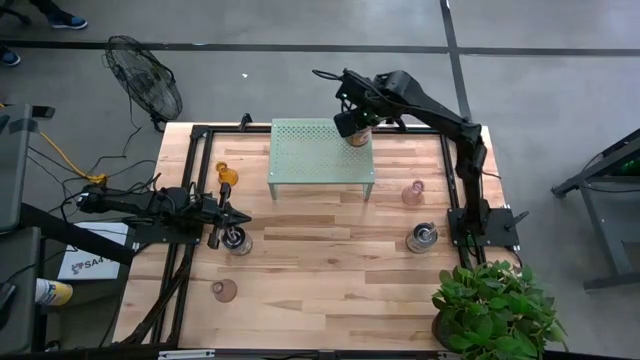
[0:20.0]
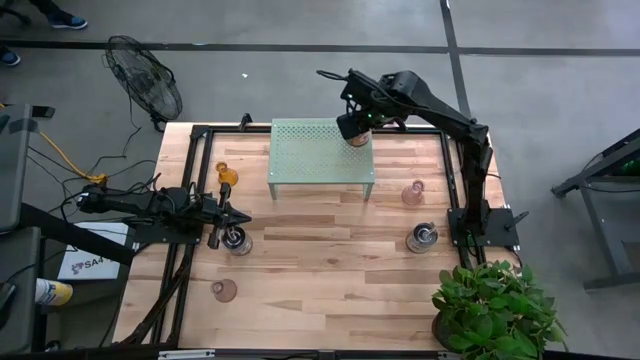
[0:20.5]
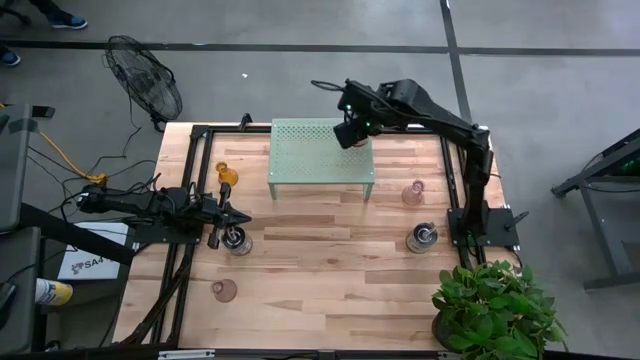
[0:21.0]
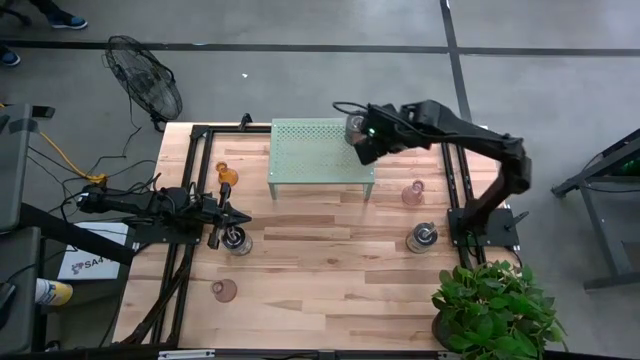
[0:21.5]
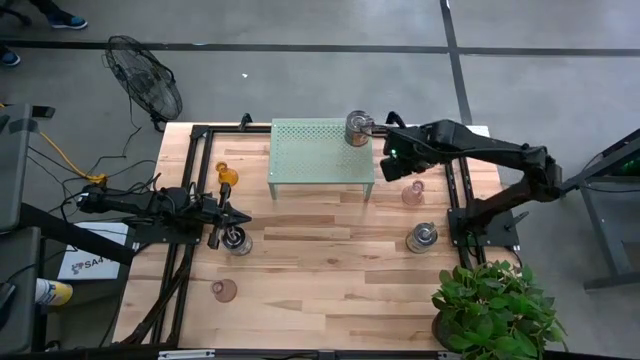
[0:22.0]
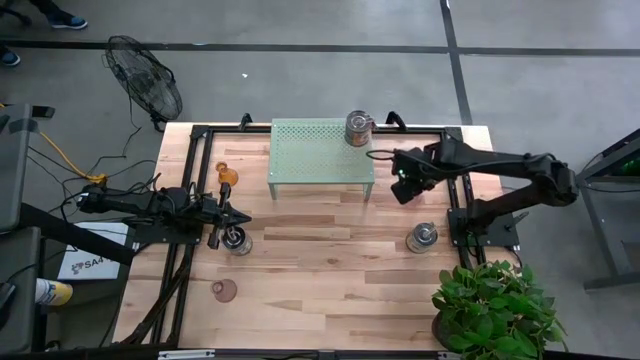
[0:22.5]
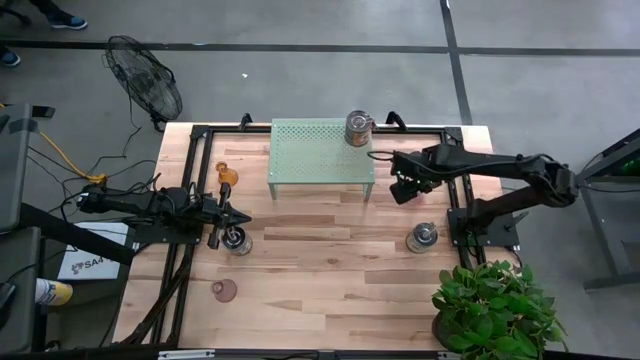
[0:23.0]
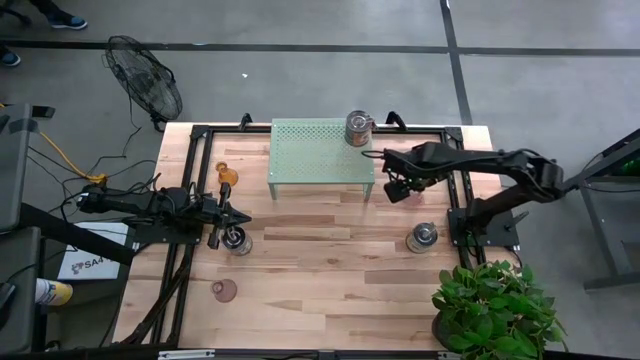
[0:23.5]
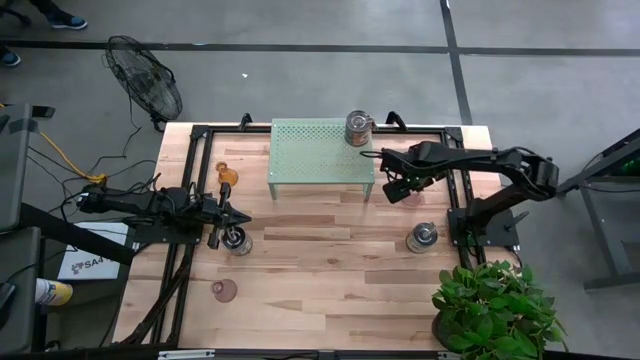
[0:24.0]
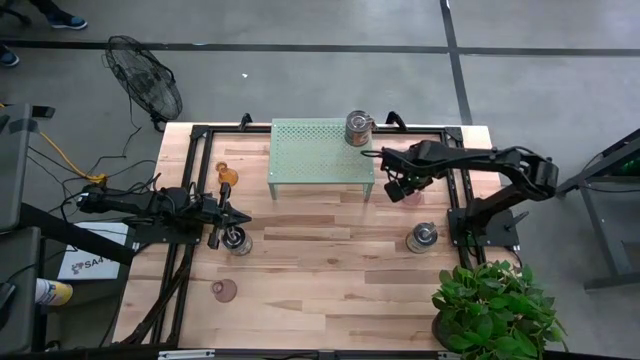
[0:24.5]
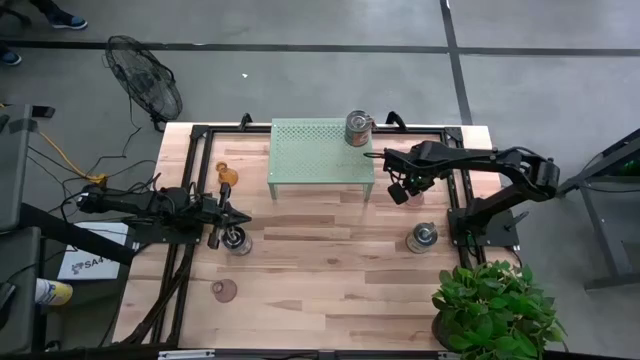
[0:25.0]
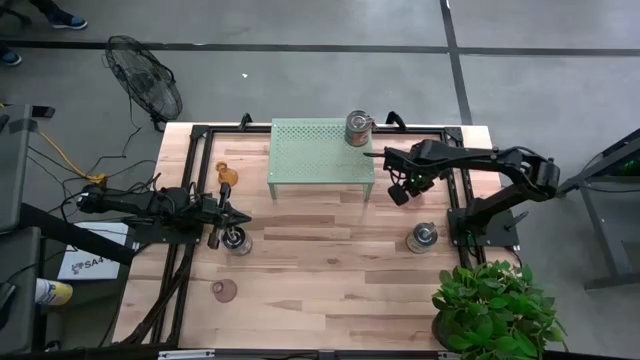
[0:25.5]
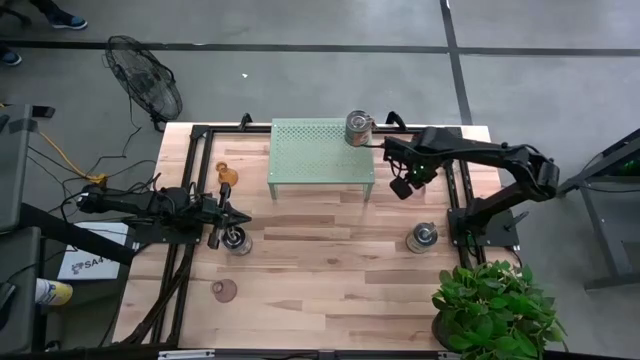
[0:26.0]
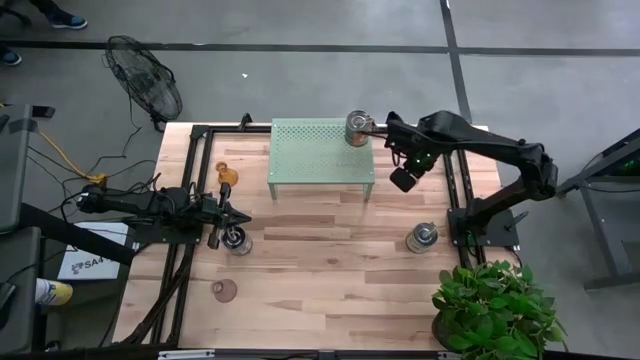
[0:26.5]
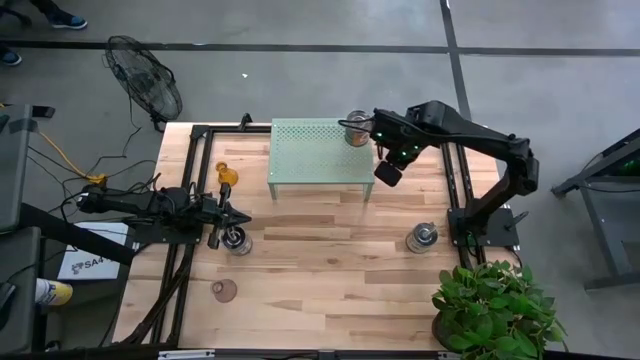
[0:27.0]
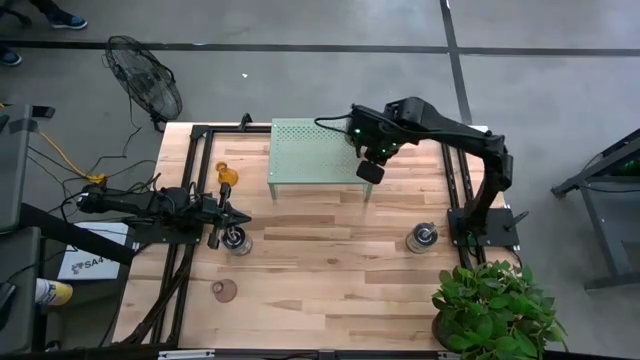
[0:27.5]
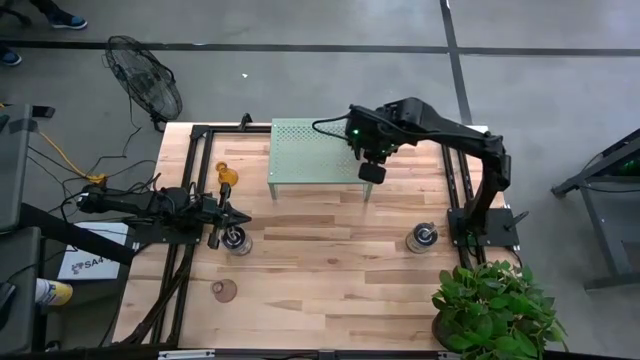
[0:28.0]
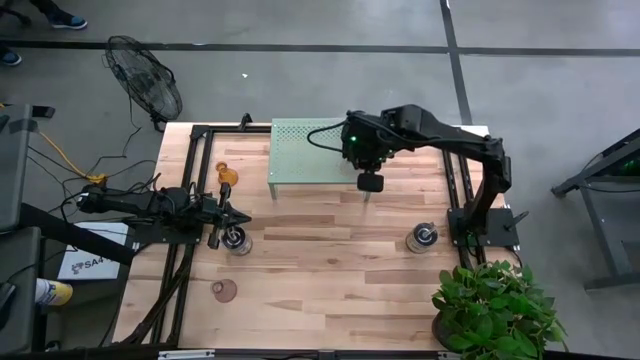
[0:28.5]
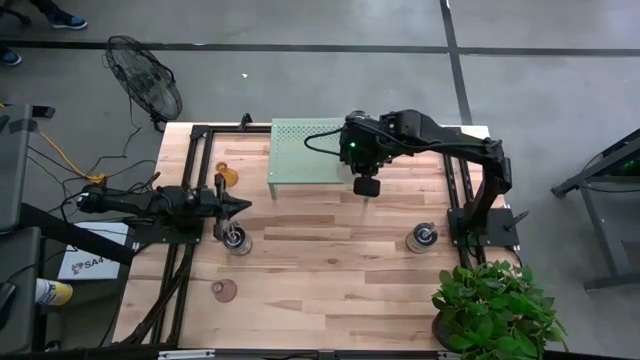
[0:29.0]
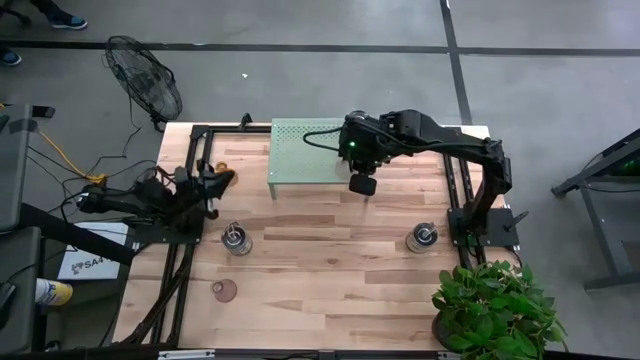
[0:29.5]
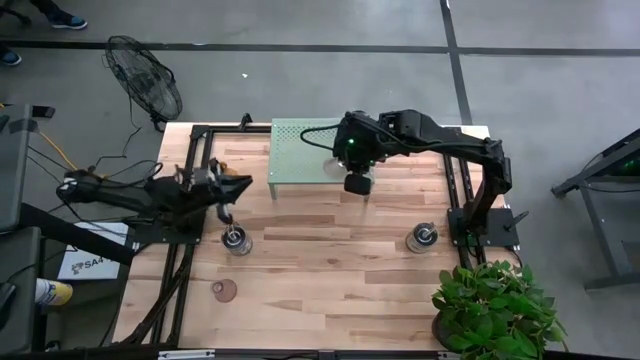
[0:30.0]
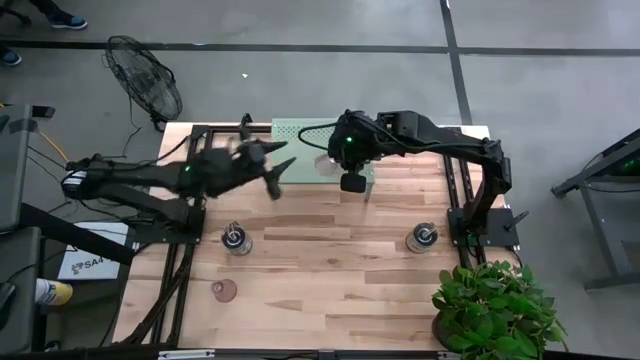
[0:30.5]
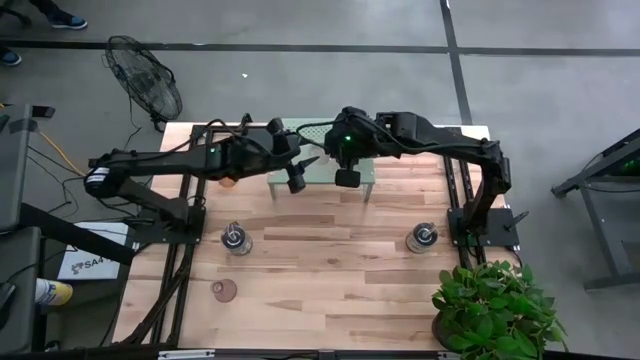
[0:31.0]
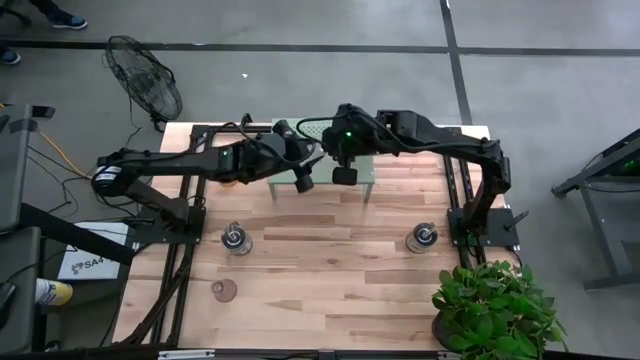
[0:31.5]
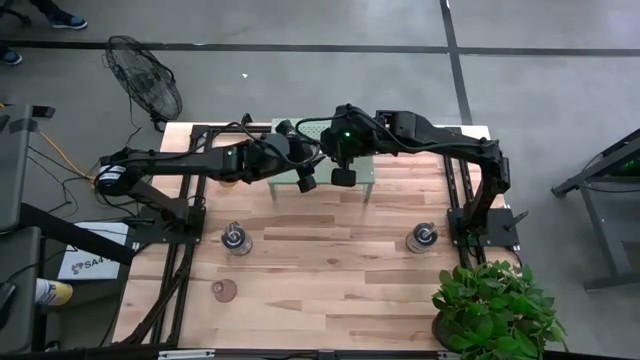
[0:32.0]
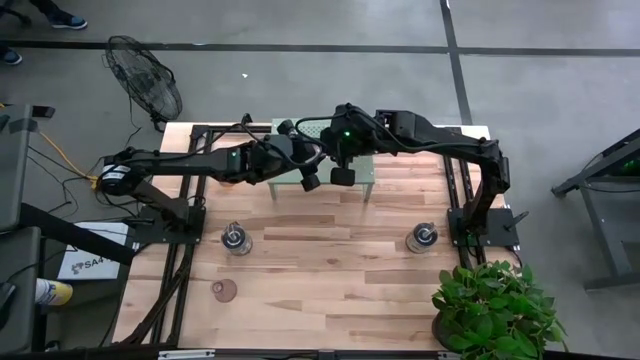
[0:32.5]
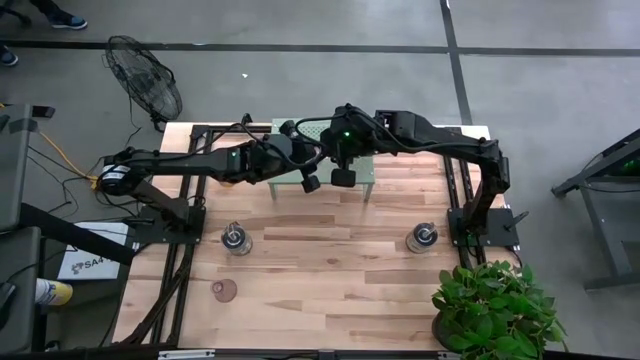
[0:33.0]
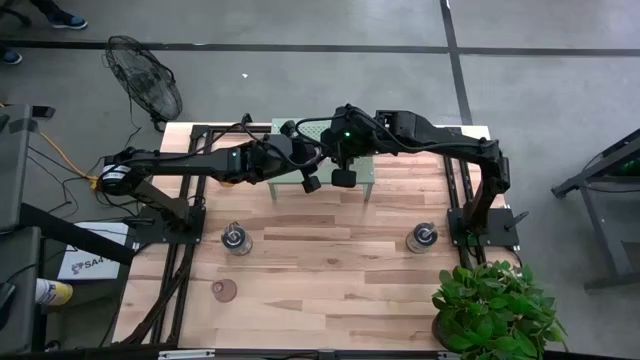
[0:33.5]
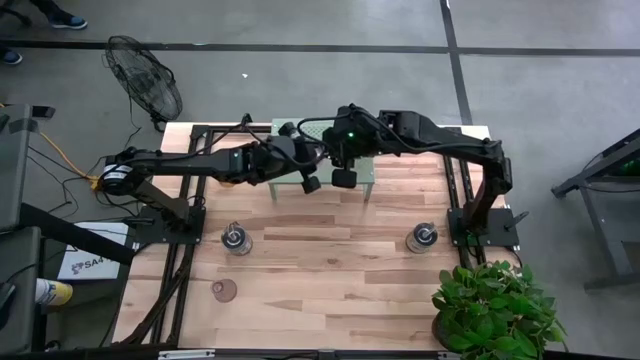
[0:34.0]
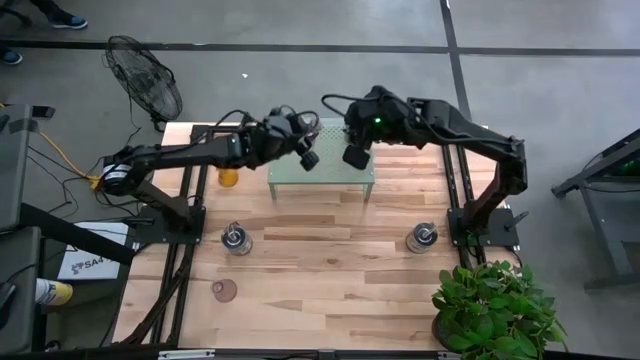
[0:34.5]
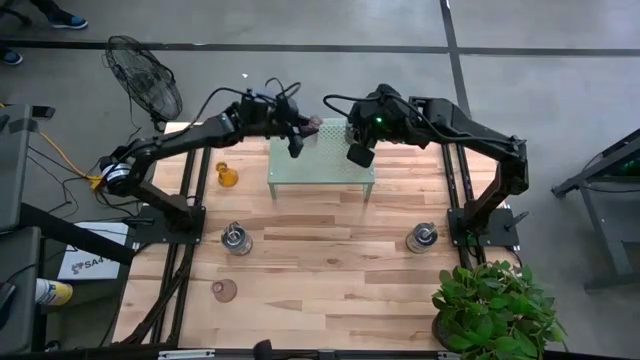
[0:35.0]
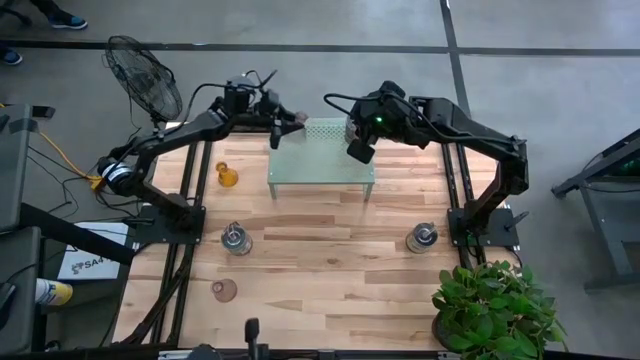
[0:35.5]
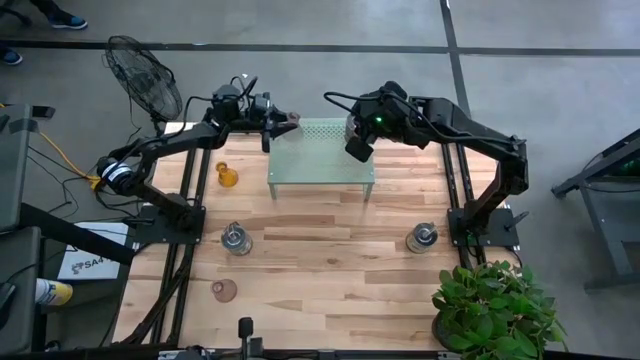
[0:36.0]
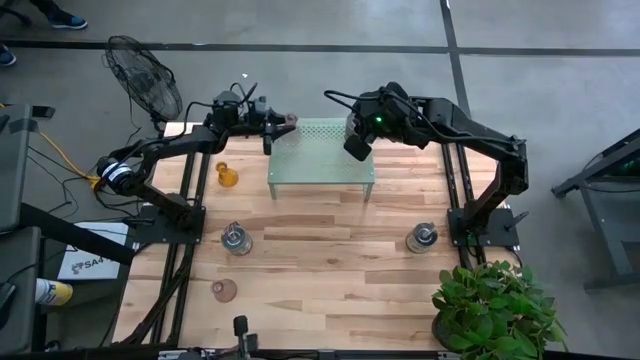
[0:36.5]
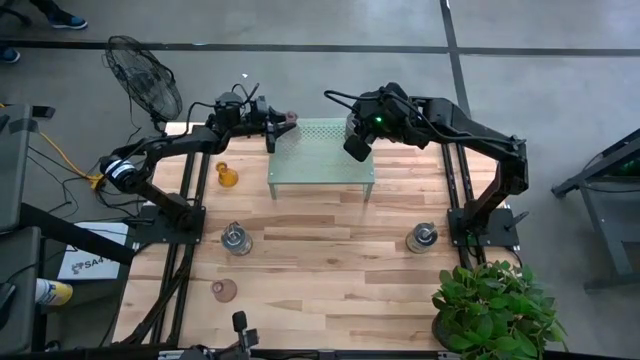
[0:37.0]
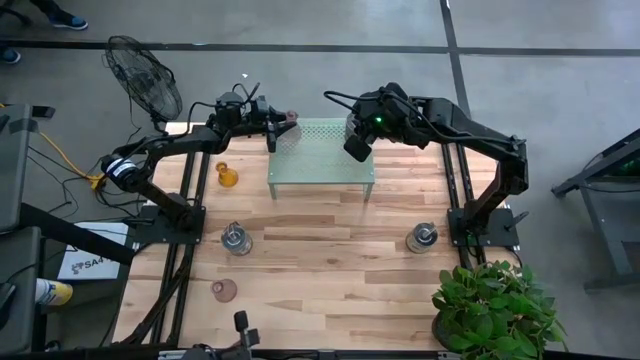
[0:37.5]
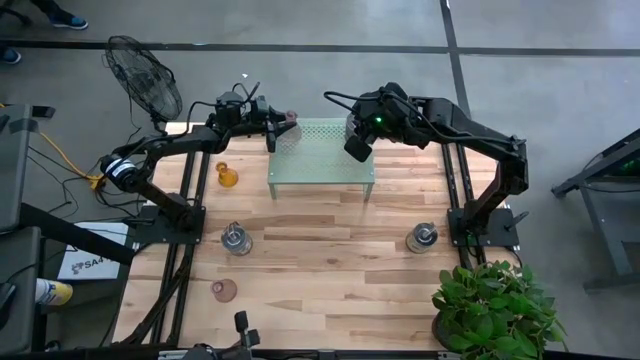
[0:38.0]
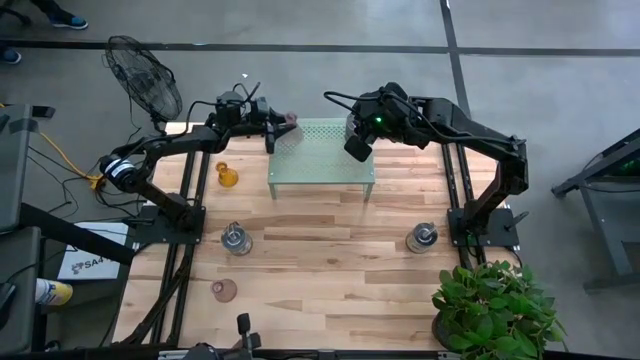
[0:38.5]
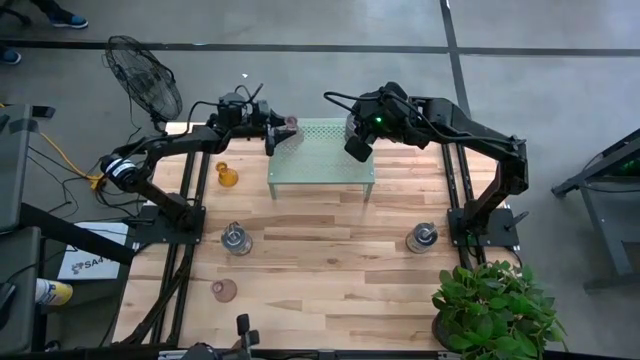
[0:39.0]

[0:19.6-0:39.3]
Task: Pick & Place candle stick holders
Put the top pink glass candle holder on the shelf

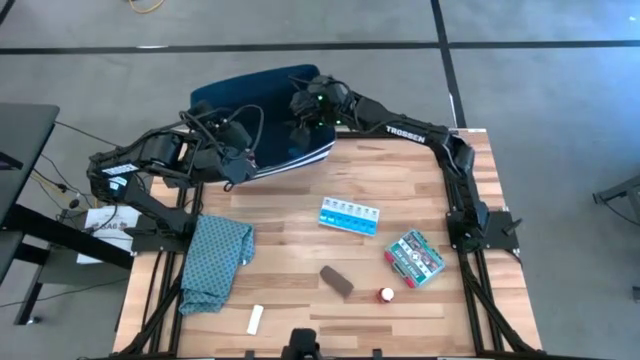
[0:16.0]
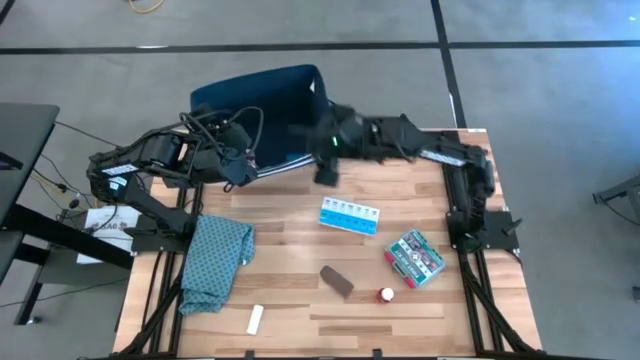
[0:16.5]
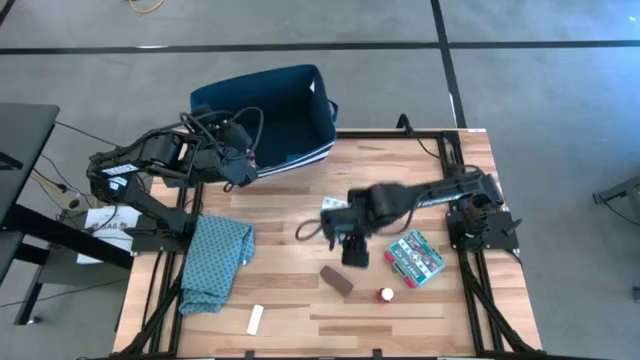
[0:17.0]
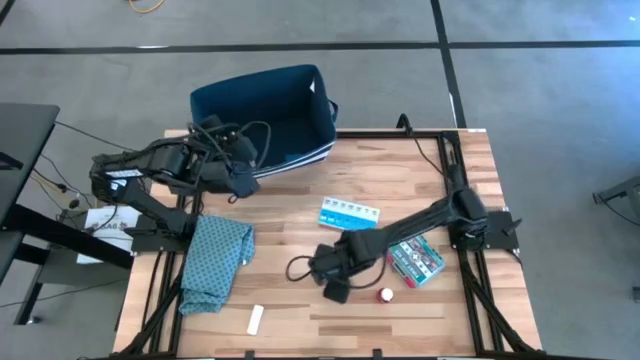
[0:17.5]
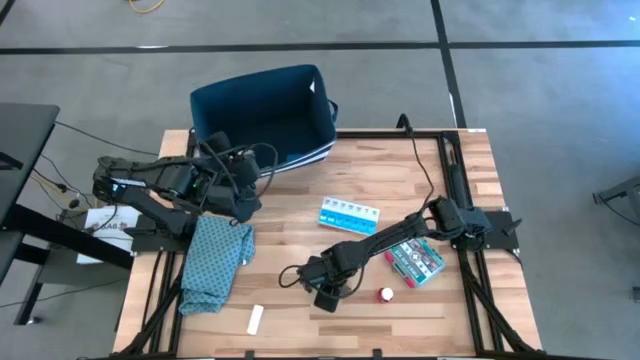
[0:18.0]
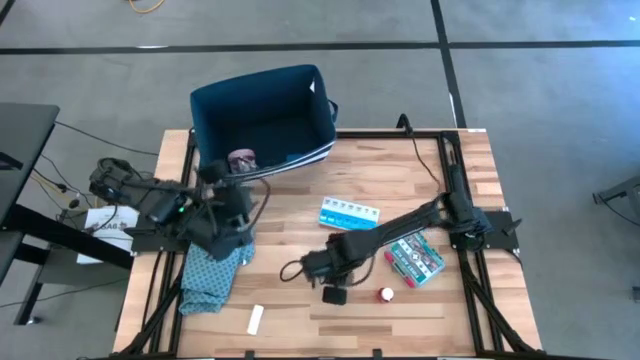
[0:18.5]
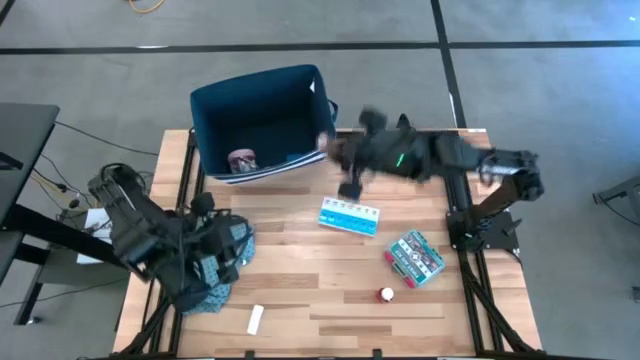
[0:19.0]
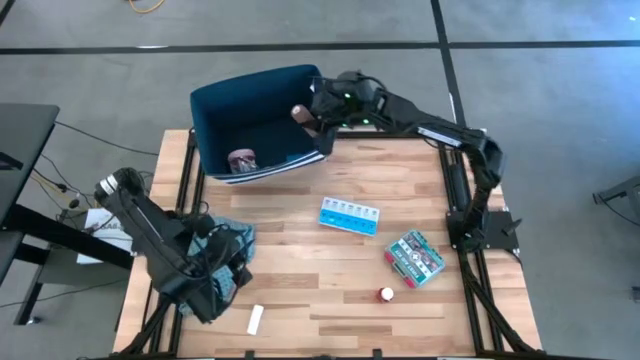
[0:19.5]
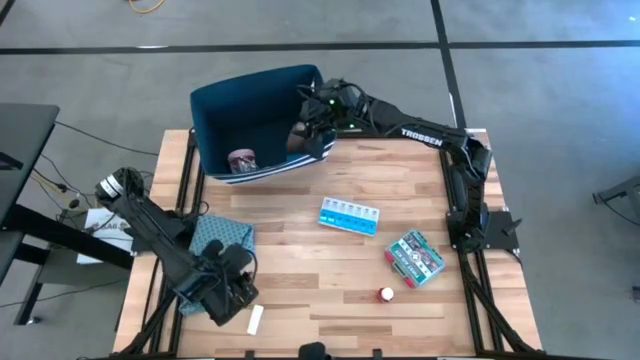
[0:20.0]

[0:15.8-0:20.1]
Task: Pick & place medical supplies in basket/bin
Put the brown bandage into the blue bin
